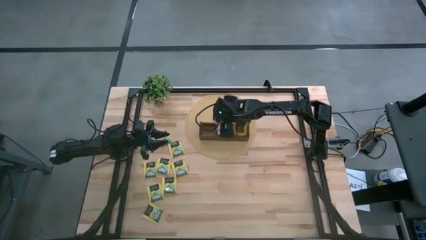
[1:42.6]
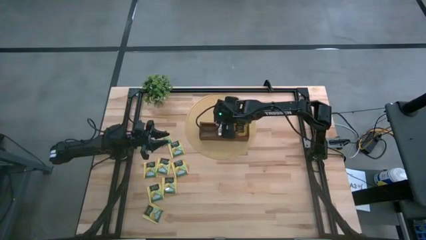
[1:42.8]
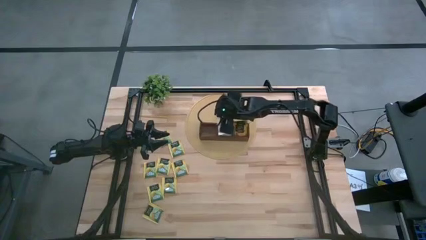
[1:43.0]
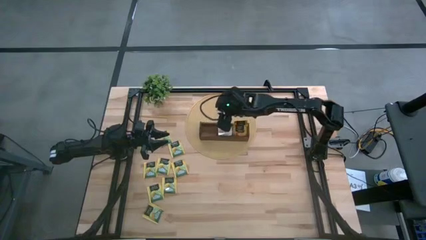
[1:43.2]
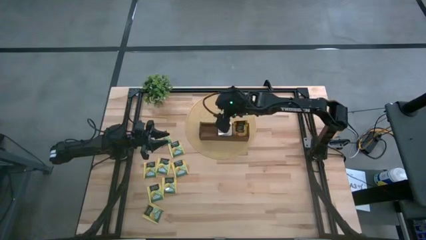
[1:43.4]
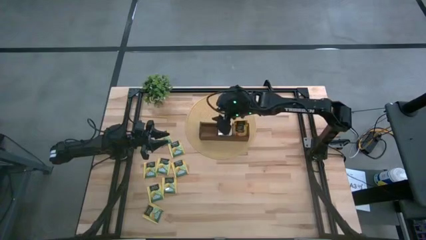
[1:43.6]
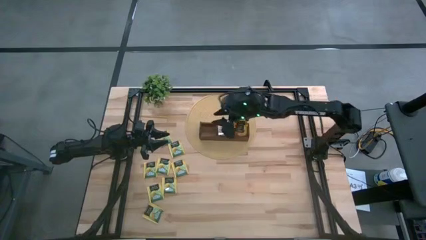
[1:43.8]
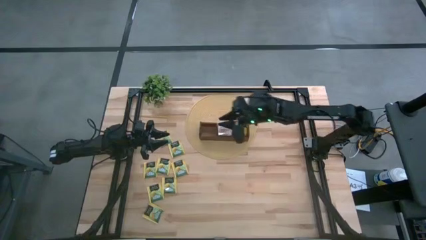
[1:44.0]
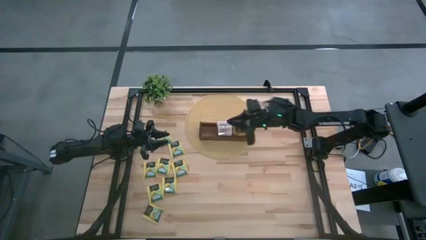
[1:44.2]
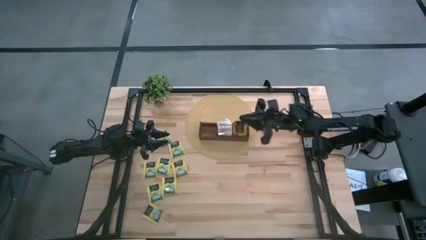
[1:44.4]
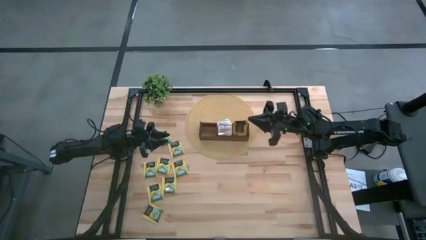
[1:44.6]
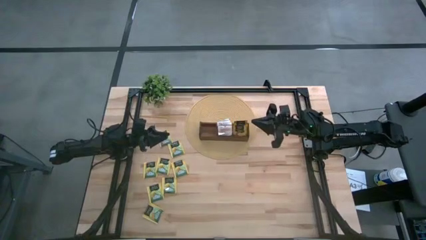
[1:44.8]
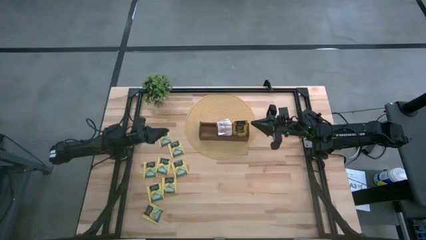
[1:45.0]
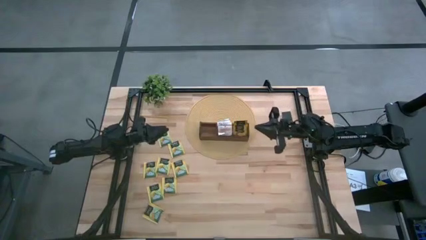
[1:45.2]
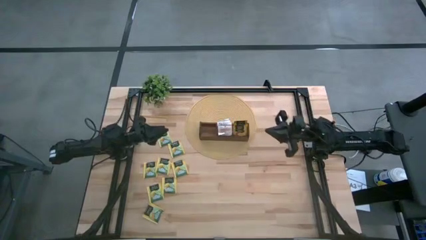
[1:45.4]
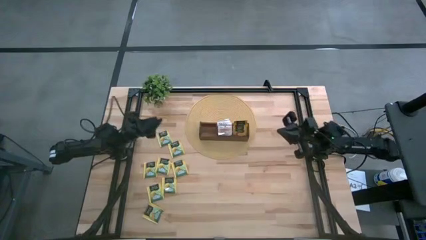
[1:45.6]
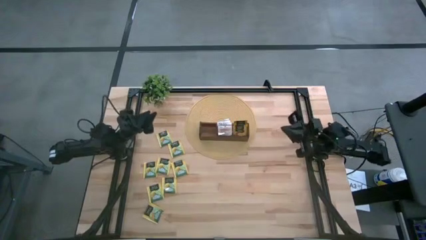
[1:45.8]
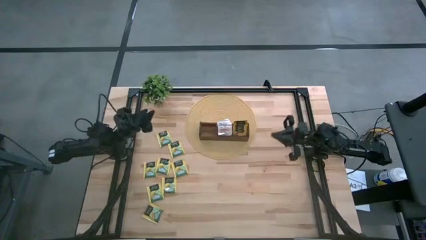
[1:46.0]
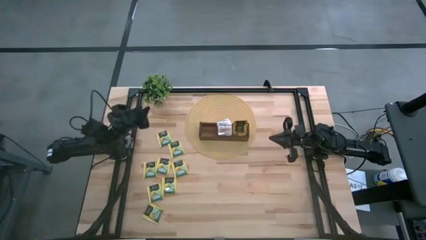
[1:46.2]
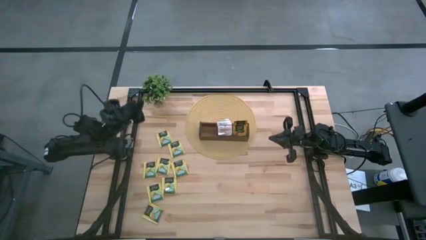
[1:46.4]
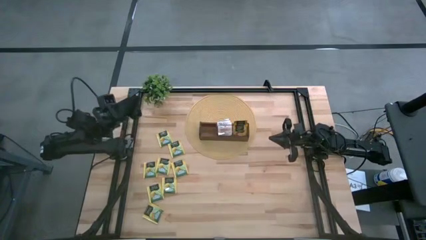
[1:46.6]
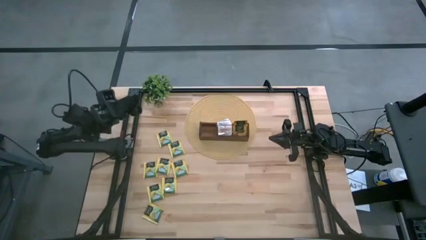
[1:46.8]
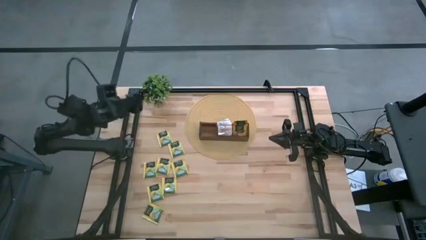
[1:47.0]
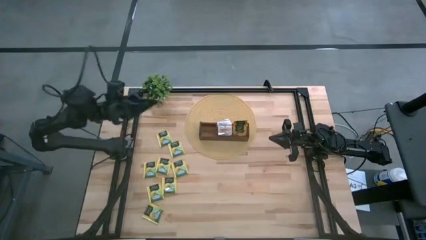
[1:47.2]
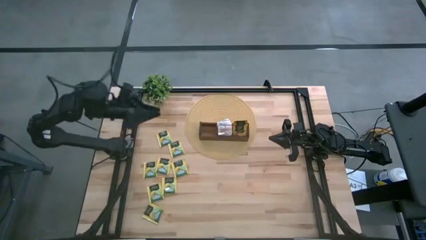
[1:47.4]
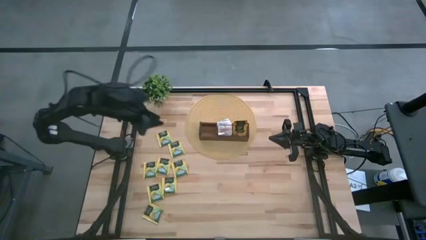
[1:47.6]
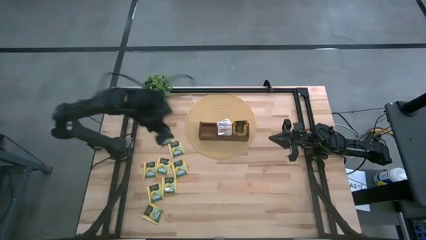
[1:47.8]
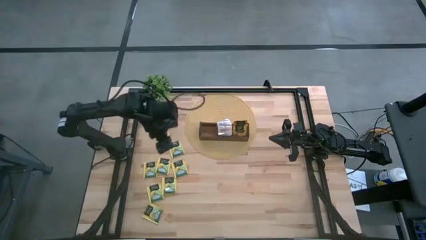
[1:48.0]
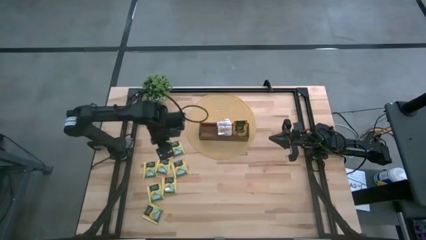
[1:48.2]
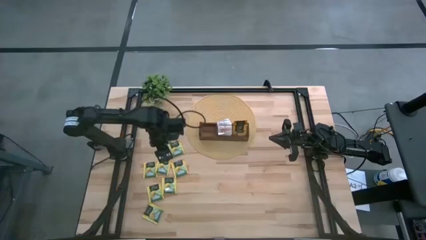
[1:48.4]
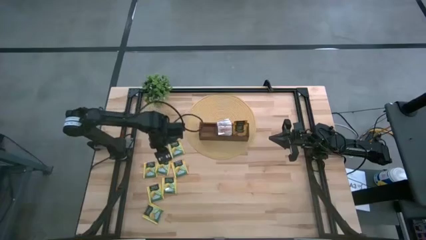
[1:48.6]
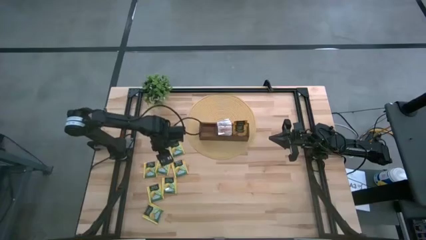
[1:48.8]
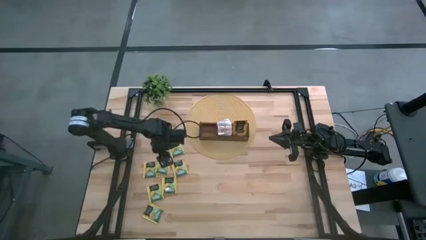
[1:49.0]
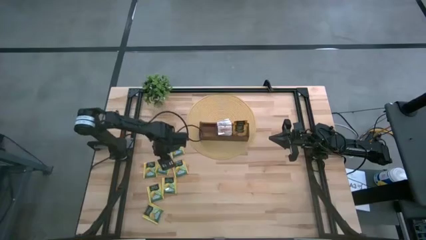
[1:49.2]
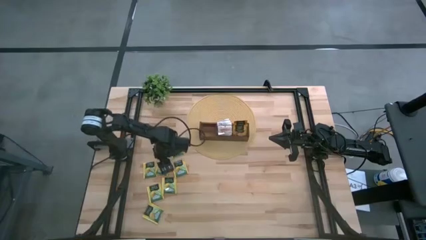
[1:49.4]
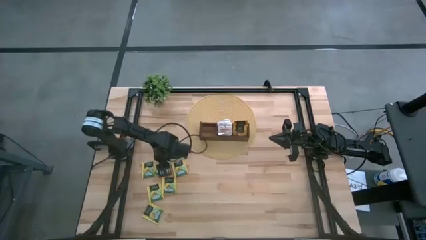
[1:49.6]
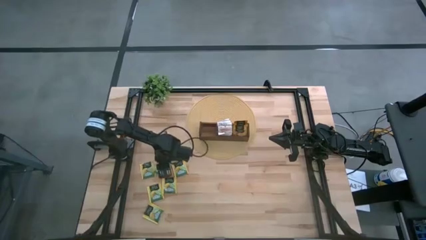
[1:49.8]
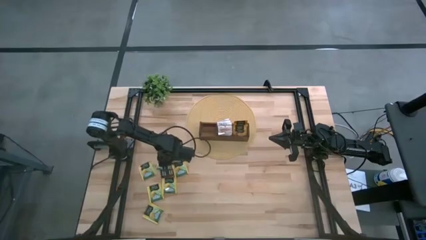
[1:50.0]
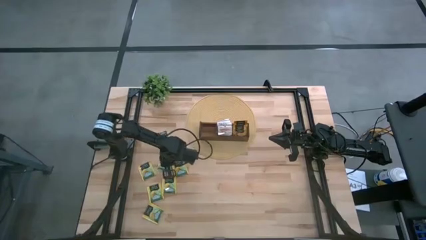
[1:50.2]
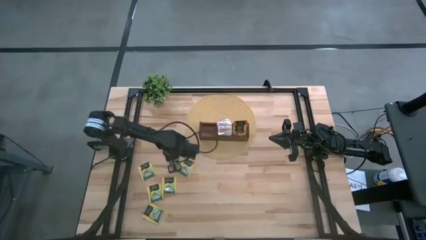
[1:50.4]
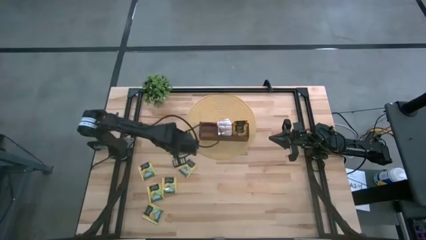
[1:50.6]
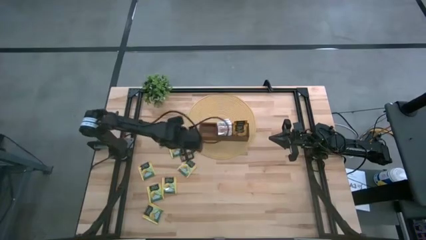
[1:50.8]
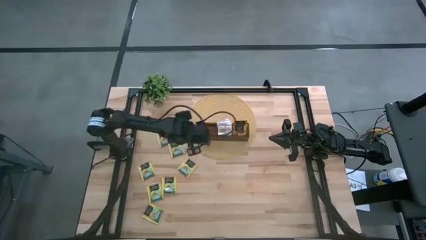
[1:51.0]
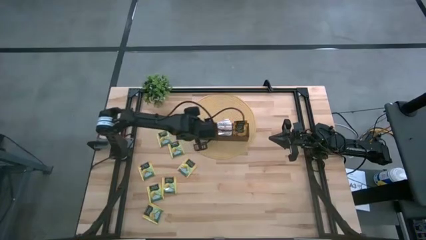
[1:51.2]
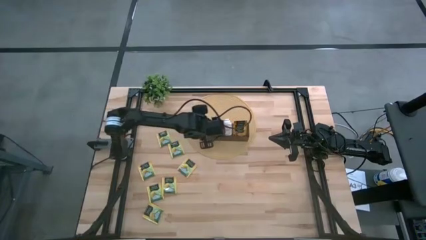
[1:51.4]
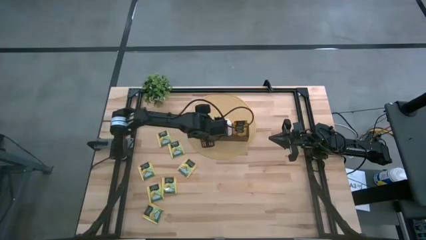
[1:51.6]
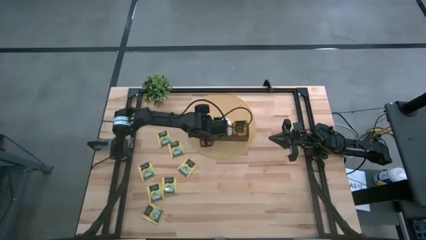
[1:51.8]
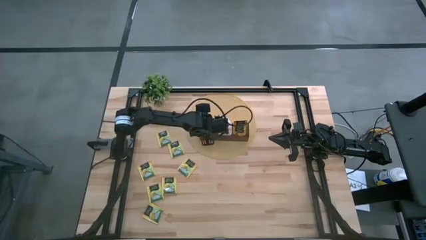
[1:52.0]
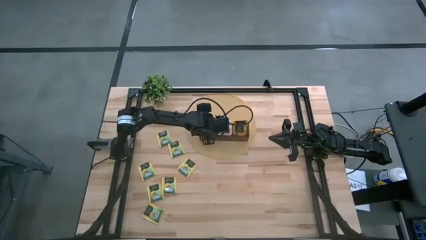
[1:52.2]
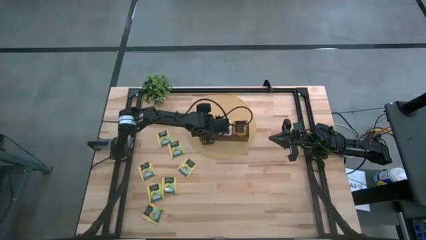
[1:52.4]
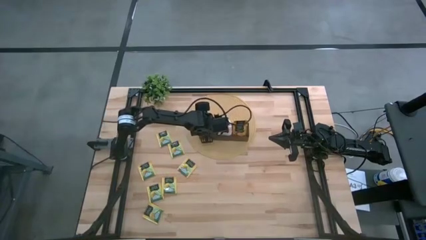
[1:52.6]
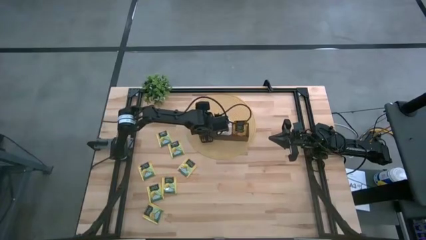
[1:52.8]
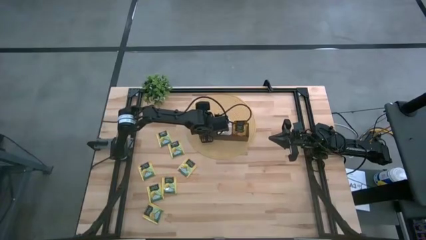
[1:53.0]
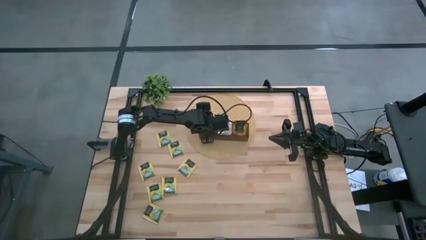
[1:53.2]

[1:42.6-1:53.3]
Task: Pick & Place Tea
Put the yellow tea bag into the left section of the wooden organizer

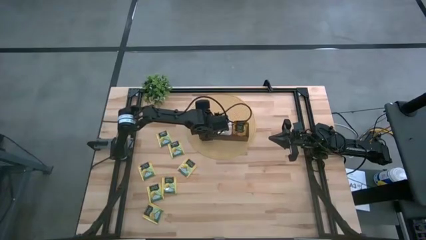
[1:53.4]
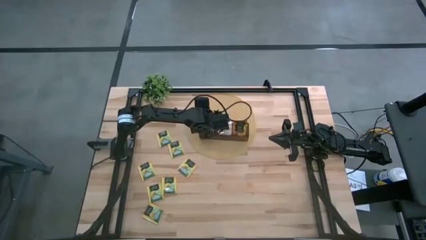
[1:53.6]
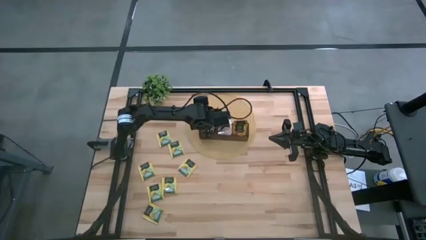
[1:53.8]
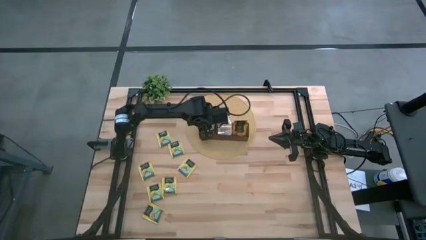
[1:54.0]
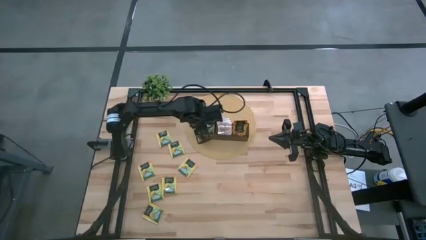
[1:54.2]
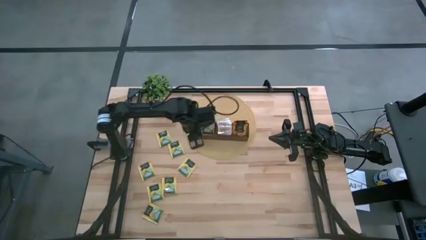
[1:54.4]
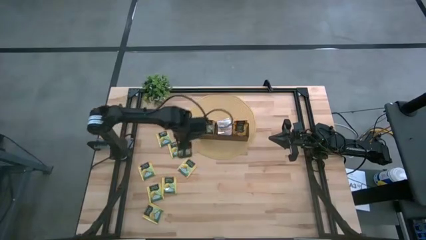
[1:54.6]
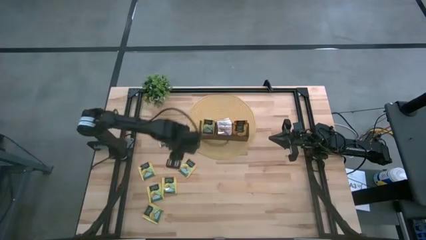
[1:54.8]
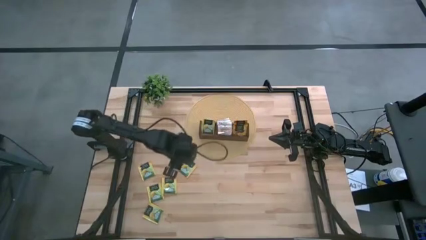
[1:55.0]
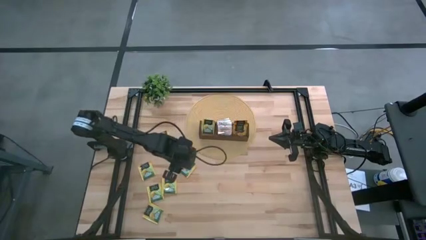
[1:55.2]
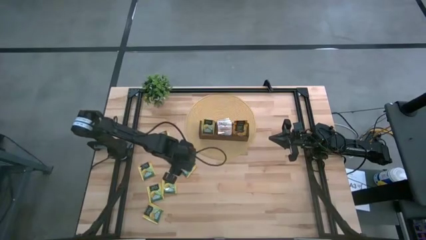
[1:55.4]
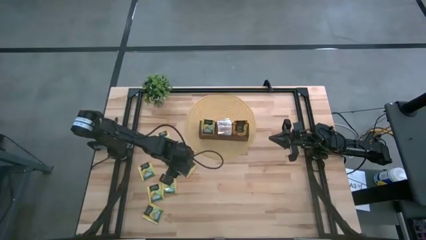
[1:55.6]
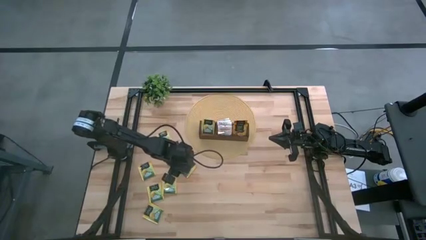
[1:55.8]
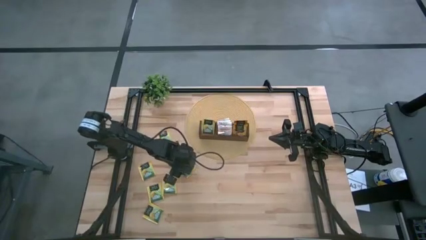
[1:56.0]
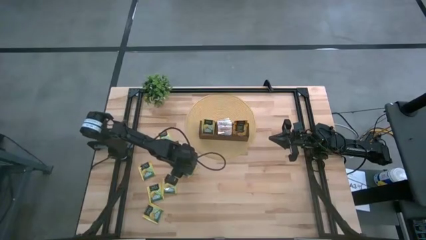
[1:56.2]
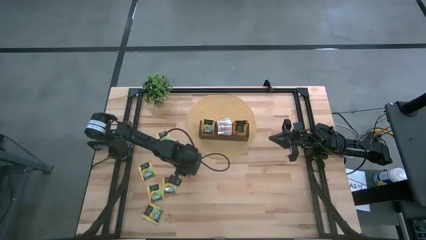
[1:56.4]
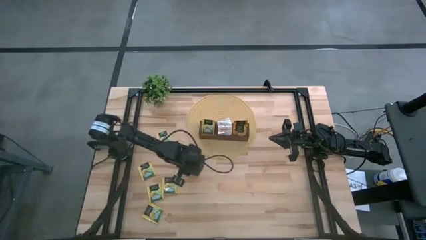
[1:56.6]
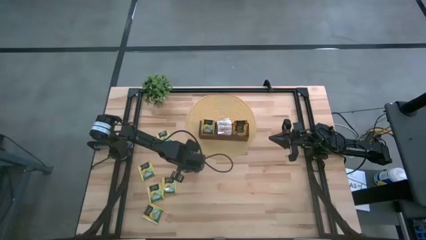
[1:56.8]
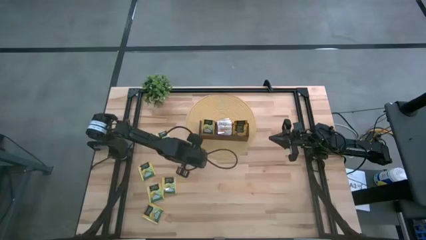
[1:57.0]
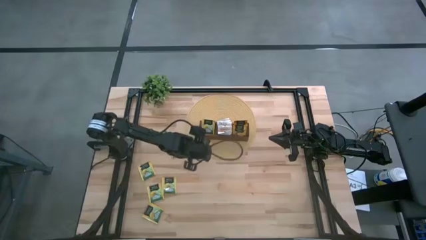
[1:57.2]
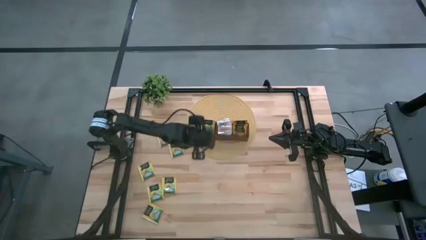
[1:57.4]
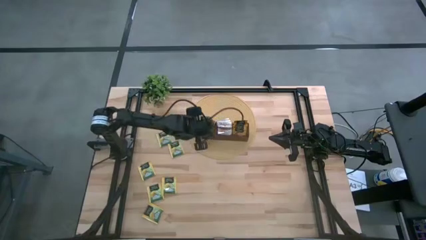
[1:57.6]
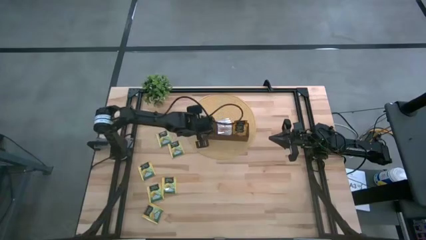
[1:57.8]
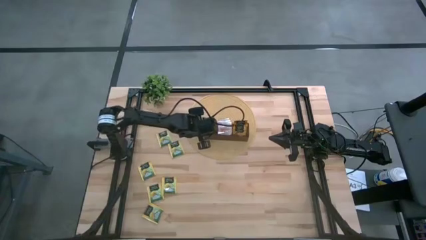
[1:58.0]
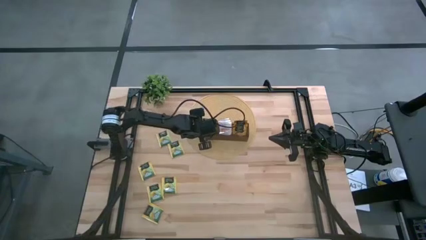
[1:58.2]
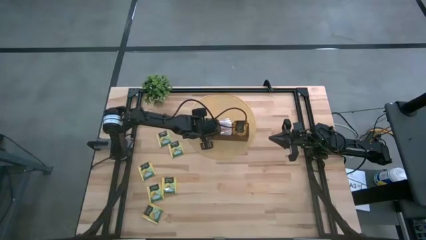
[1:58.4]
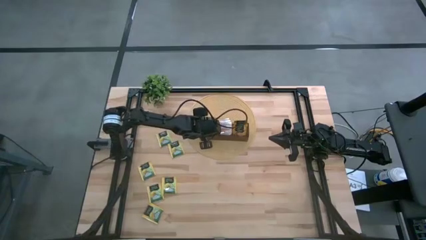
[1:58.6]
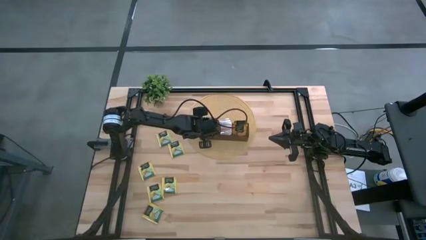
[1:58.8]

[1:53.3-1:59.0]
Put the yellow tea bag into the left section of the wooden organizer
